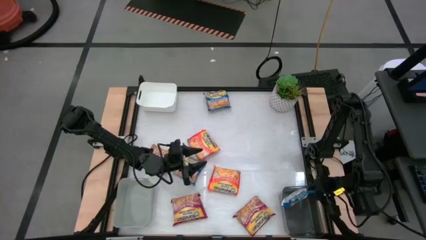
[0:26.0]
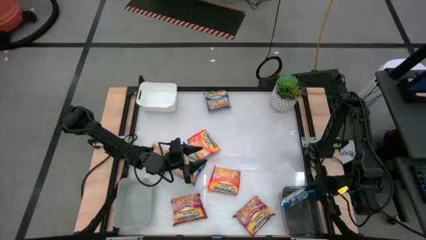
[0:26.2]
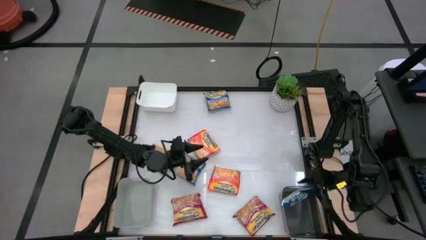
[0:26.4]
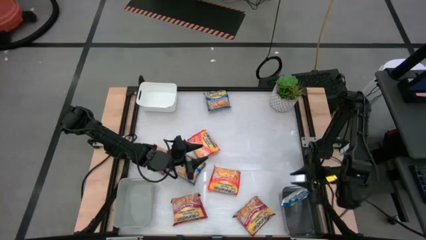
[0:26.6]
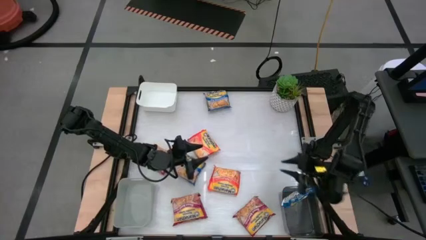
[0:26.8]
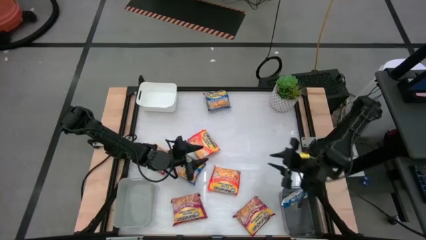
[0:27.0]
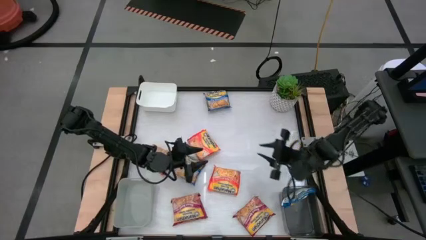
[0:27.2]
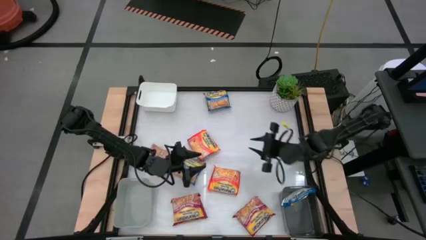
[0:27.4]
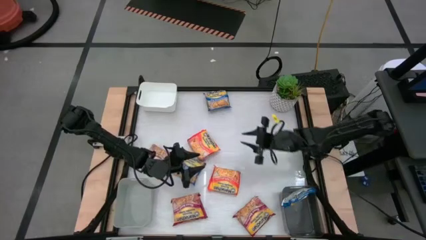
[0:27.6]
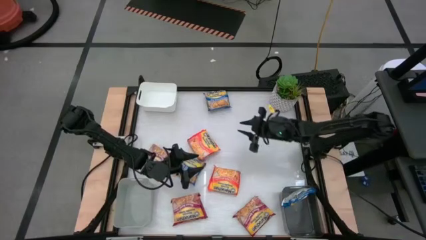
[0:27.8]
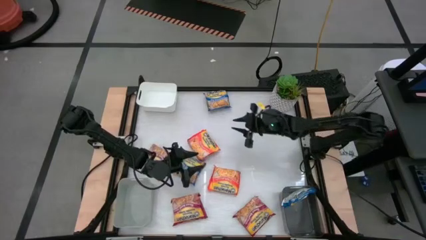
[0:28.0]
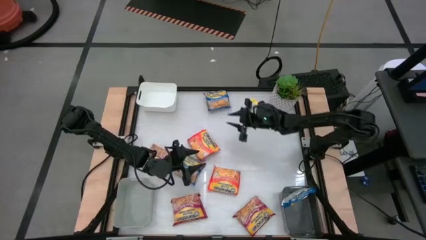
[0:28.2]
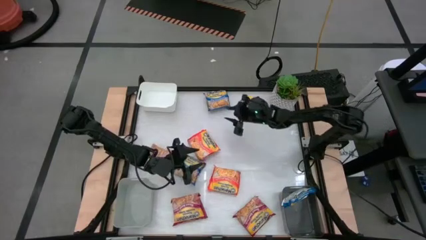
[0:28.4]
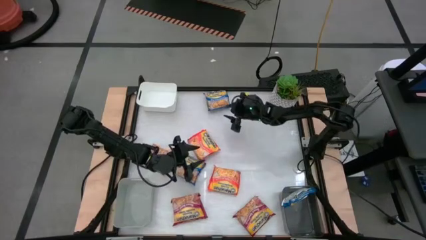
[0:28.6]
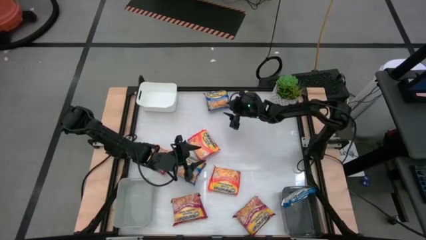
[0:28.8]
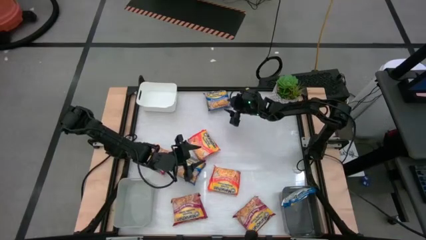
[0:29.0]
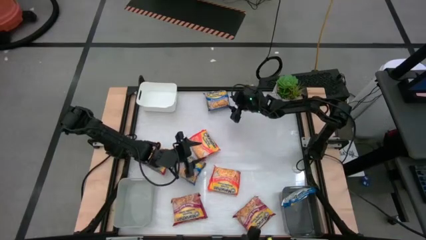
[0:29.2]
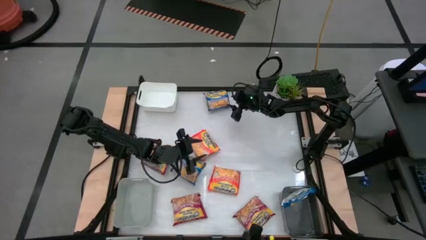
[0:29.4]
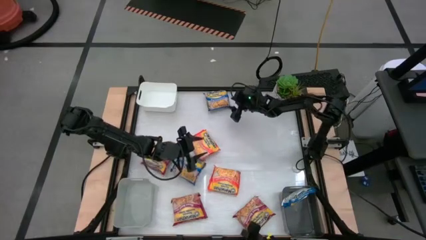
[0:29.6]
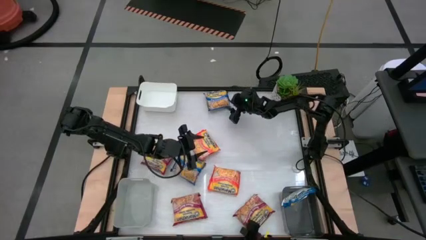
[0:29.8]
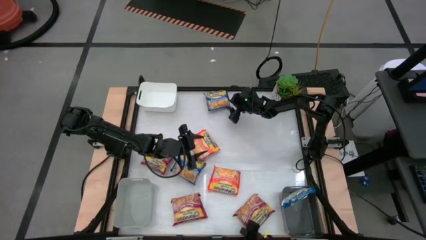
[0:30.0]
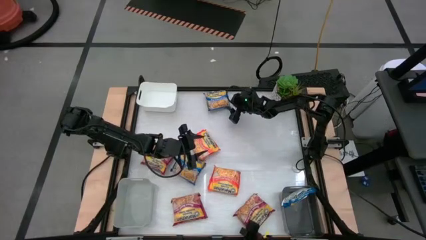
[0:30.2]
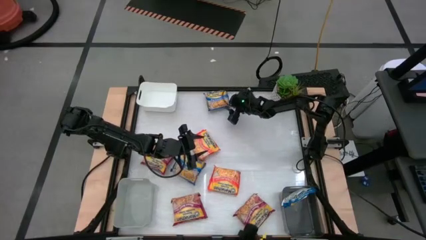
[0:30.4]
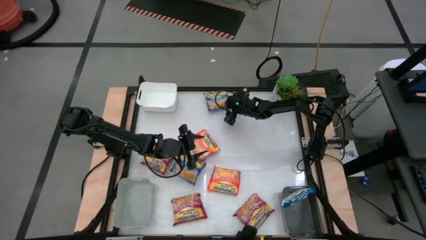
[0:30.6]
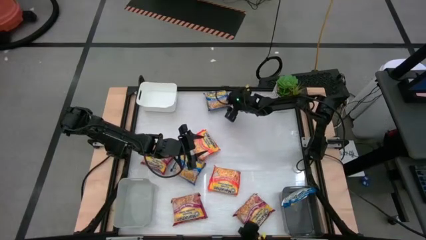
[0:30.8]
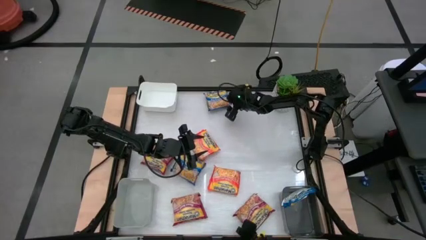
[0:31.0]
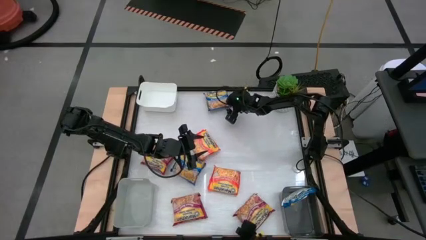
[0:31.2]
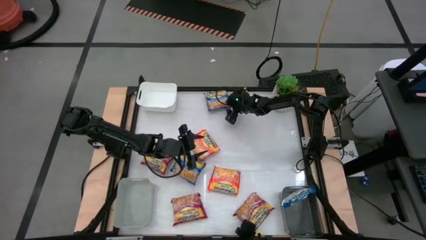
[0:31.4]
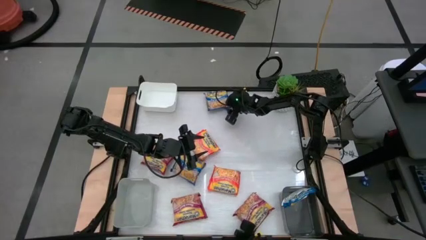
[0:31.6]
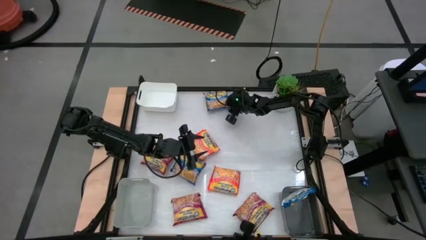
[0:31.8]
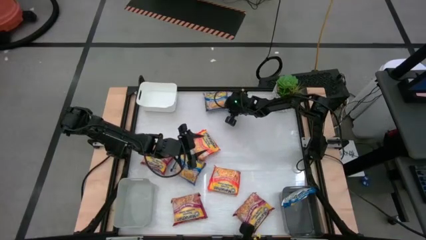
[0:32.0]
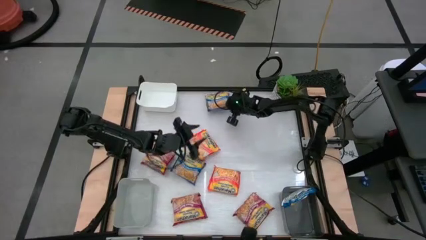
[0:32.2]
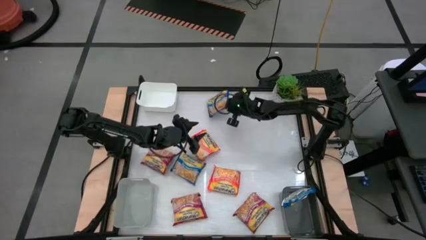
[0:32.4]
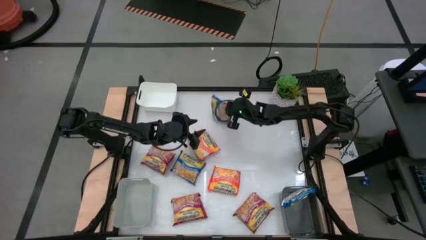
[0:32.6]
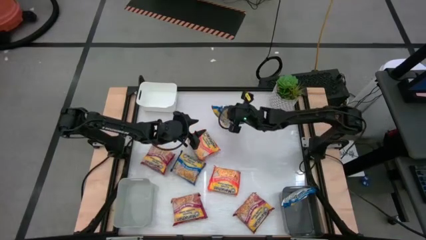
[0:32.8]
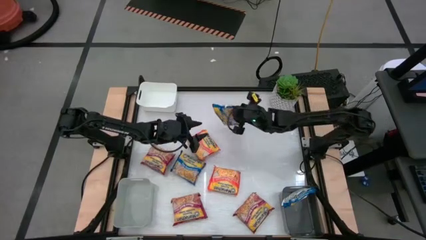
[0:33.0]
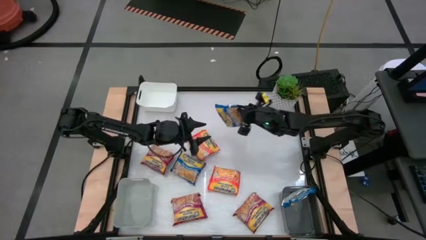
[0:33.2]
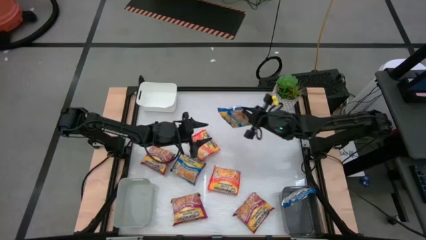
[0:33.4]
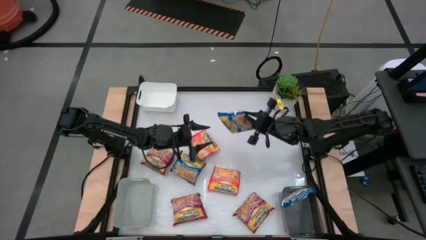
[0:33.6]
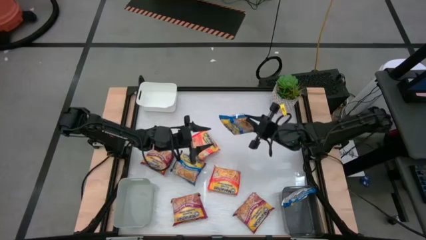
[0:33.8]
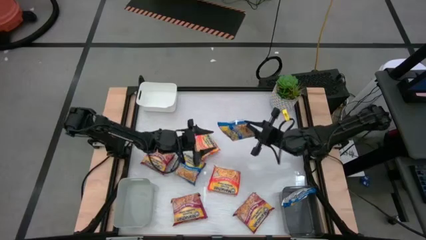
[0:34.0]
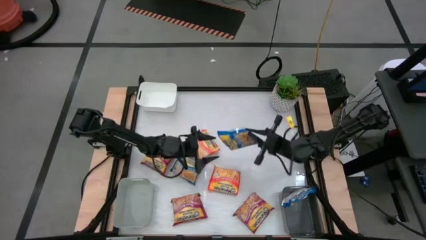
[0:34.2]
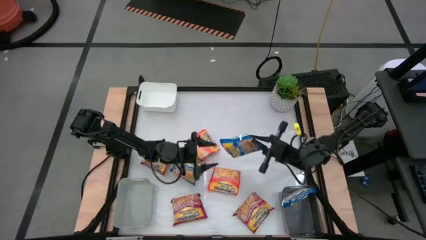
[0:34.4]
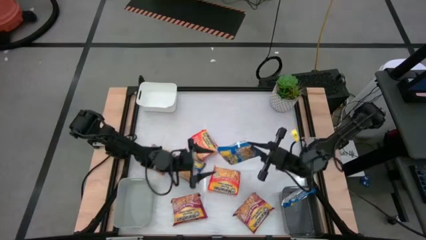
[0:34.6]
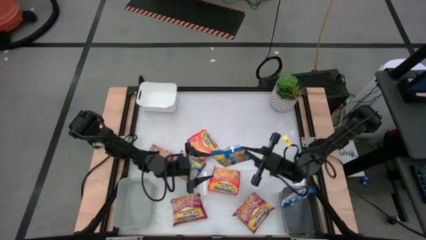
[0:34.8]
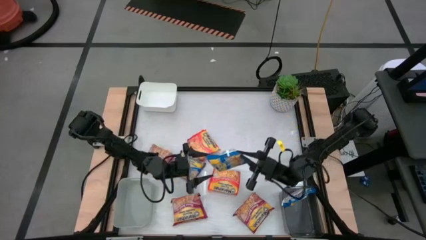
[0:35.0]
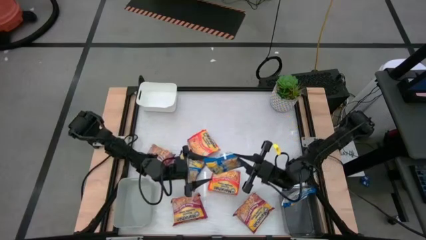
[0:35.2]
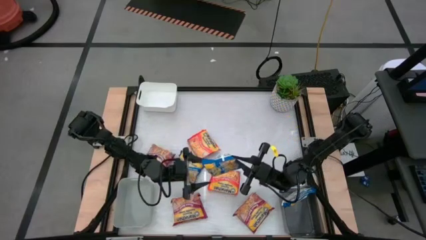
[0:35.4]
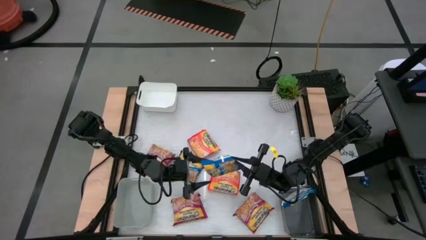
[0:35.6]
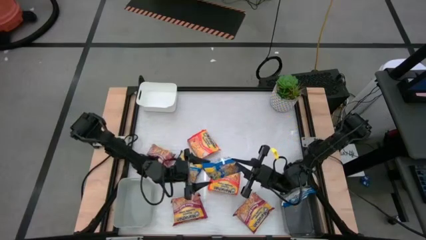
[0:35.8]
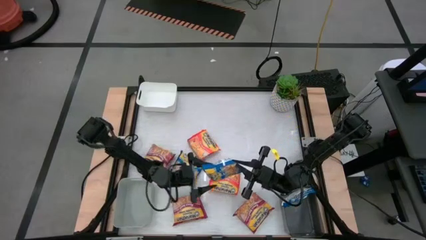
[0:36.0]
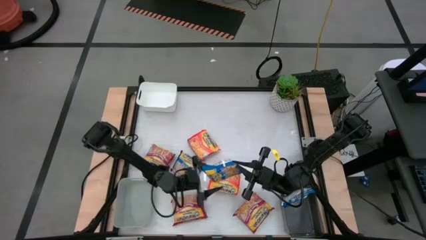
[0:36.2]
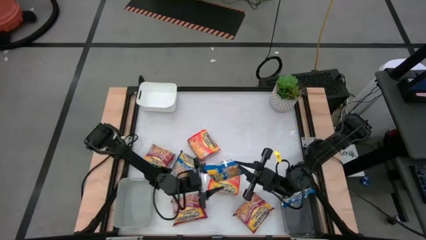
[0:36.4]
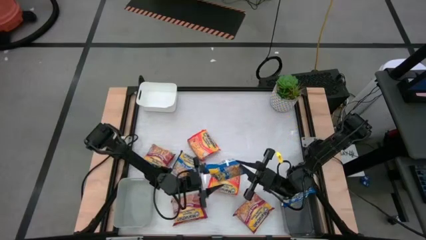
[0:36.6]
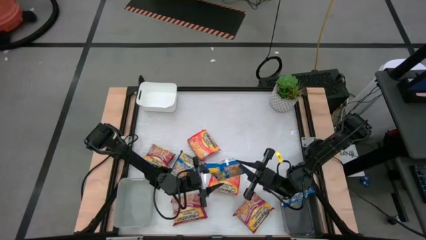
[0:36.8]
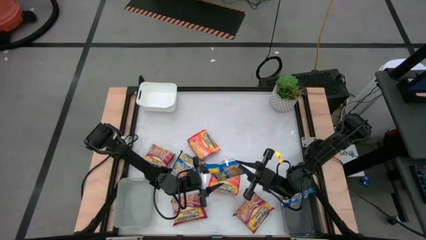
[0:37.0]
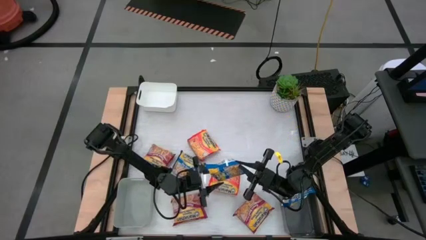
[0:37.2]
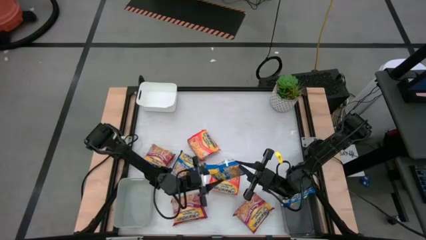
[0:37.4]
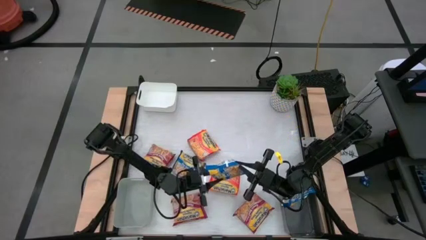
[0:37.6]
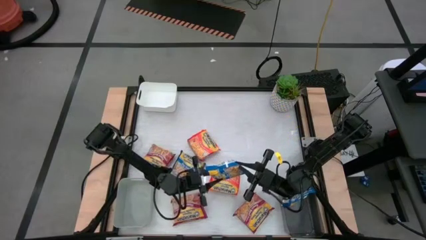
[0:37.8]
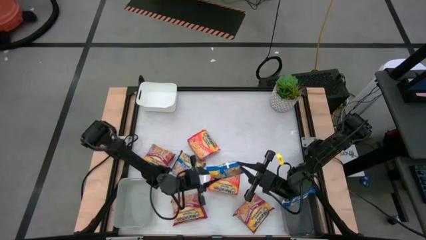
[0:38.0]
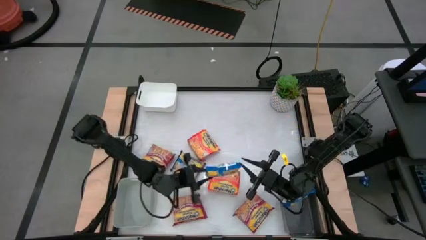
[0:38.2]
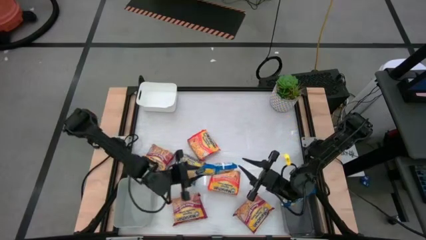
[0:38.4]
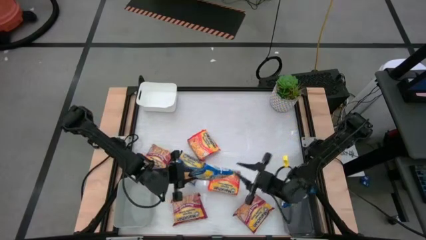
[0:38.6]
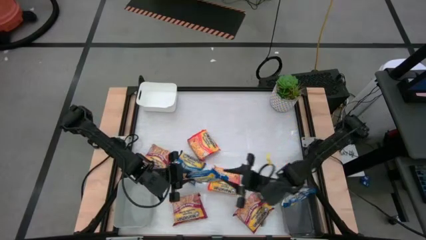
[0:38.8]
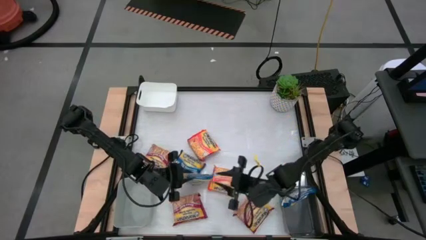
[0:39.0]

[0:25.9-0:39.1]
Task: Sort Maruchan noodles
Put the top blue noodle pack into the black bin

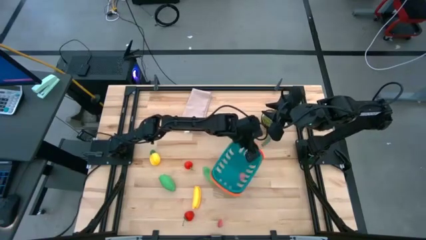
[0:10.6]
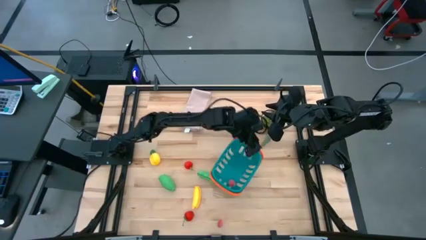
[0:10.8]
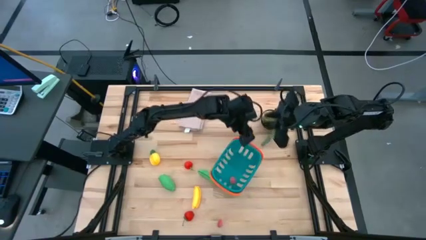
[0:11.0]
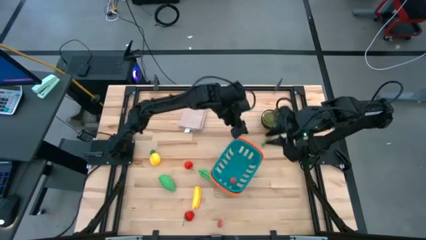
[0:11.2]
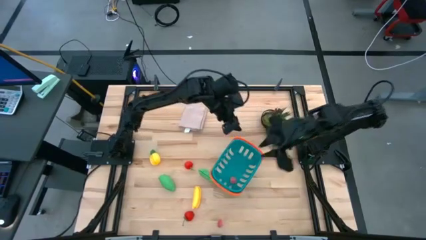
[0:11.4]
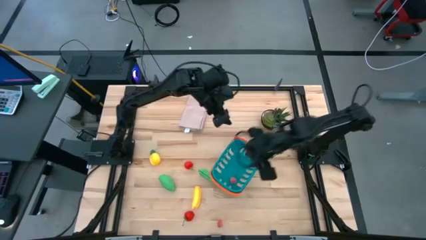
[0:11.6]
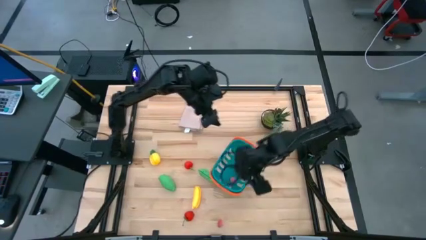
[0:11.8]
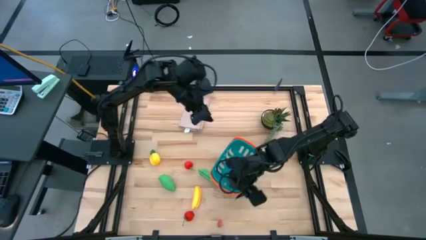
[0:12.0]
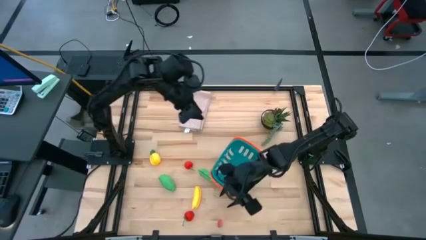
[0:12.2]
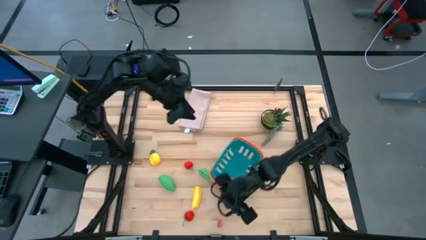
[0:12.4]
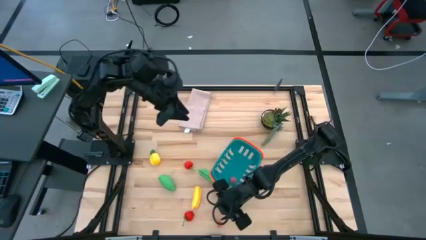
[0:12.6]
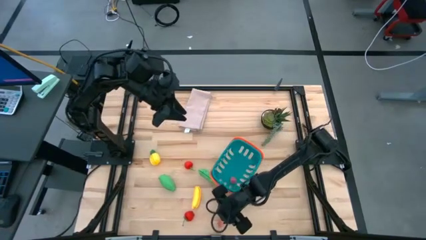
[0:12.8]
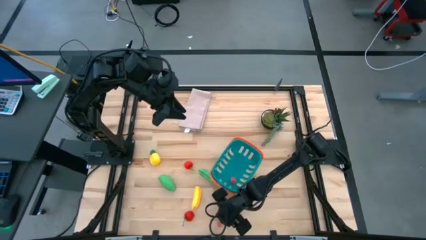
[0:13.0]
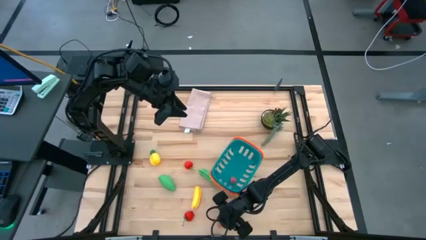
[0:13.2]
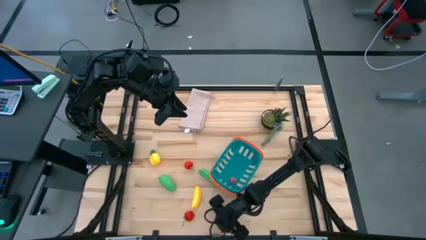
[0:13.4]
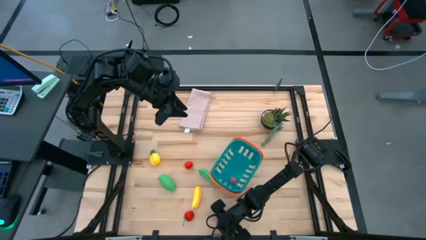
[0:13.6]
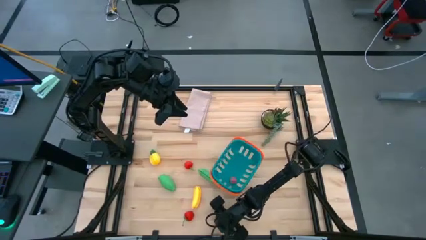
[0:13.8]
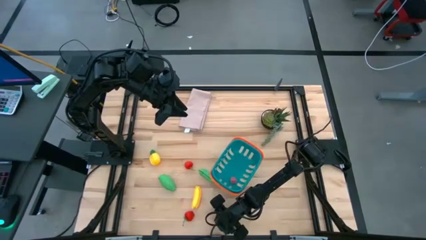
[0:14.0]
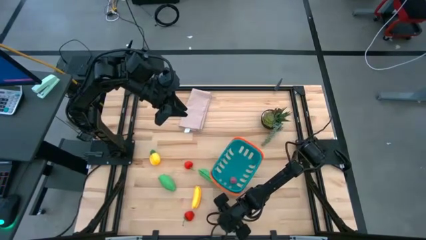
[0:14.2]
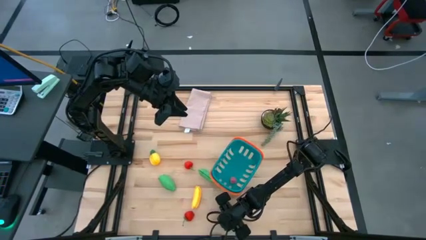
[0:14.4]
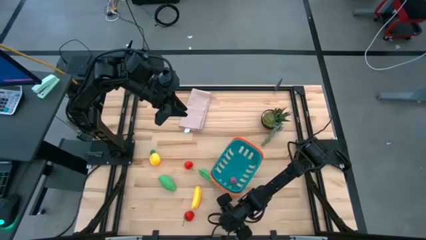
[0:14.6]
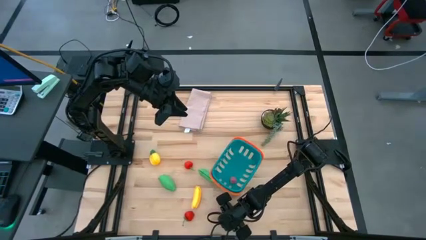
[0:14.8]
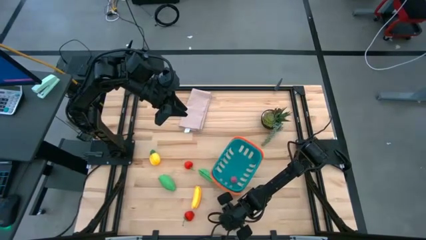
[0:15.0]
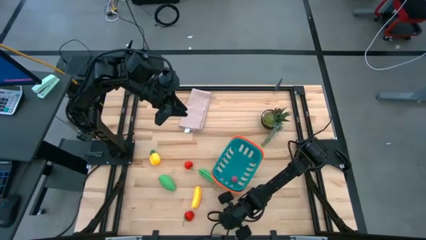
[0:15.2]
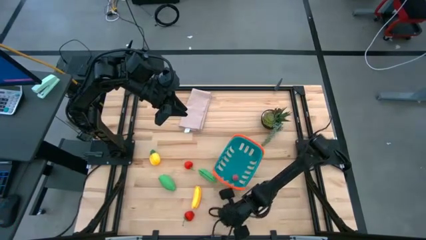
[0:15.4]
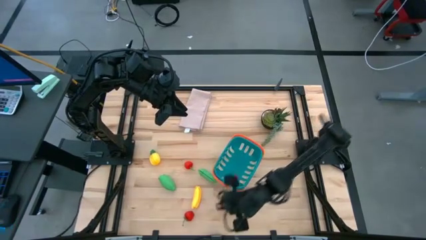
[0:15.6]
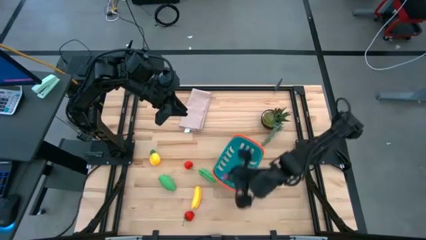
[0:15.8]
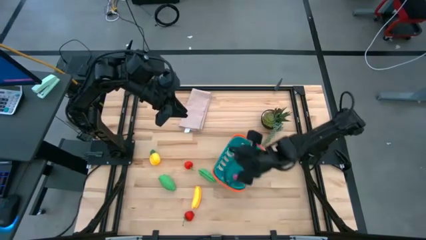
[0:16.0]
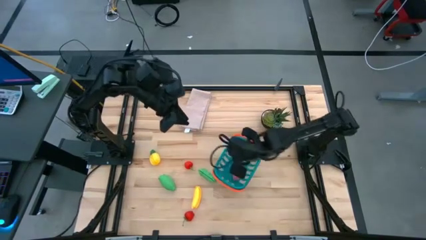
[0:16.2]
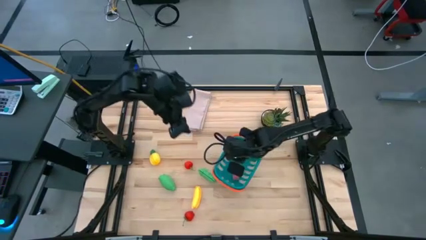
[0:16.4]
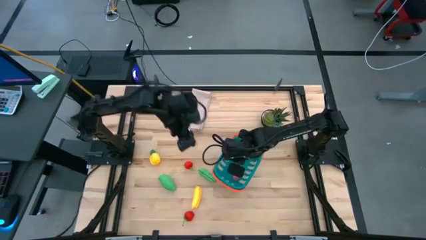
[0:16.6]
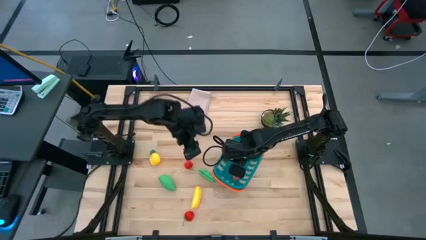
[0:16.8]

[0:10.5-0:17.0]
Task: Pick and placing Produce into tupperware
Put the pink peach into the blue basket
